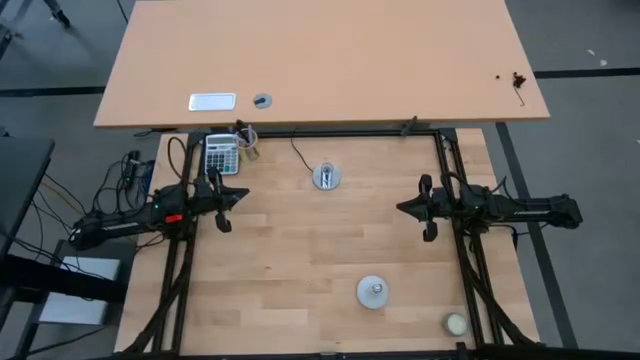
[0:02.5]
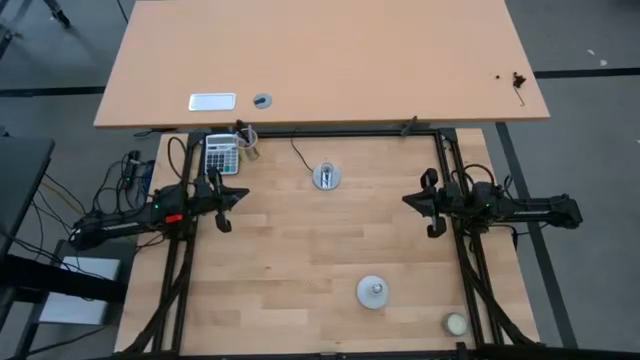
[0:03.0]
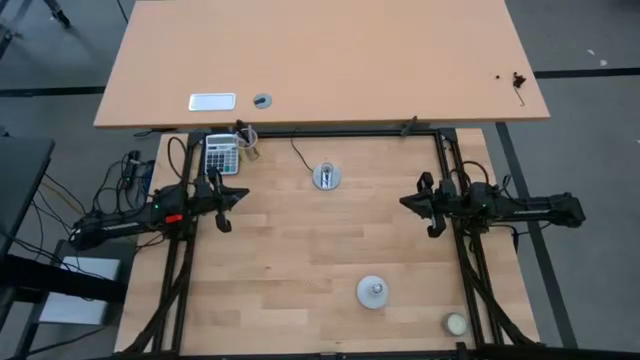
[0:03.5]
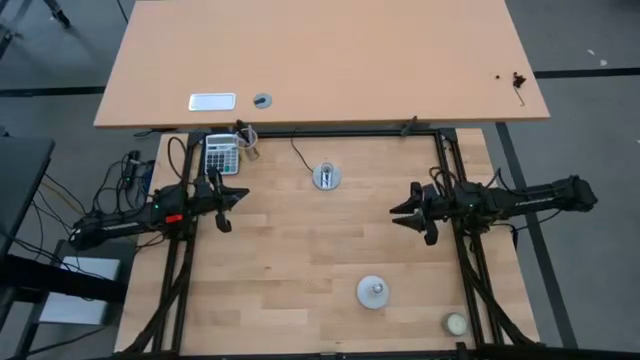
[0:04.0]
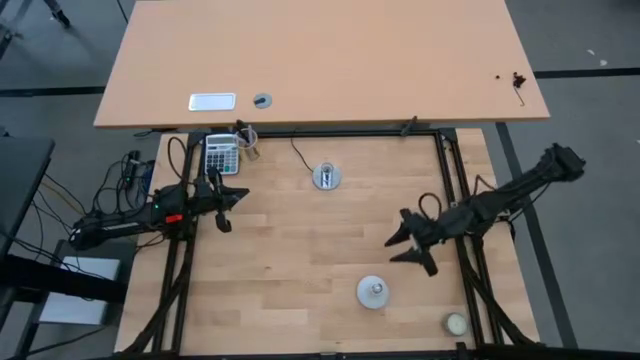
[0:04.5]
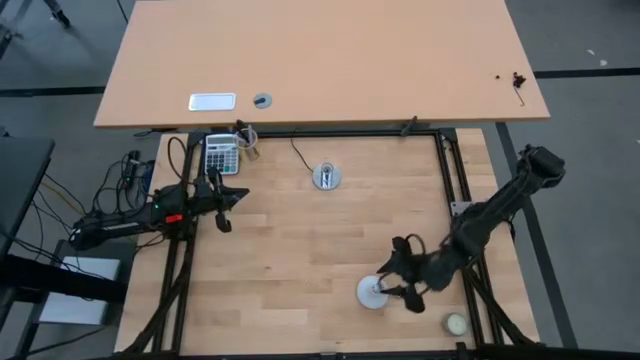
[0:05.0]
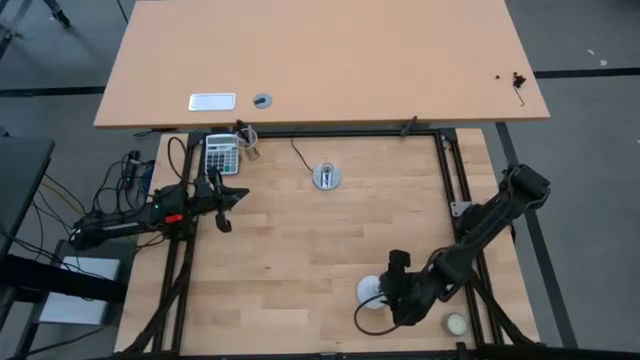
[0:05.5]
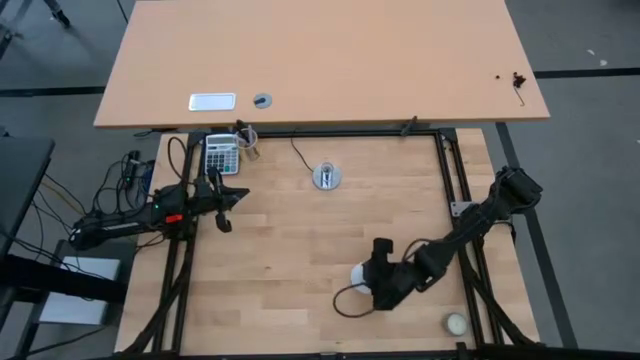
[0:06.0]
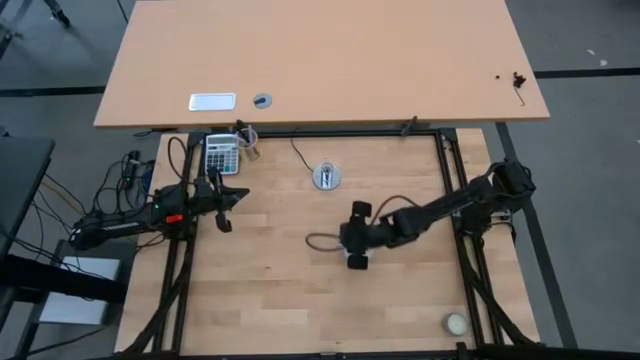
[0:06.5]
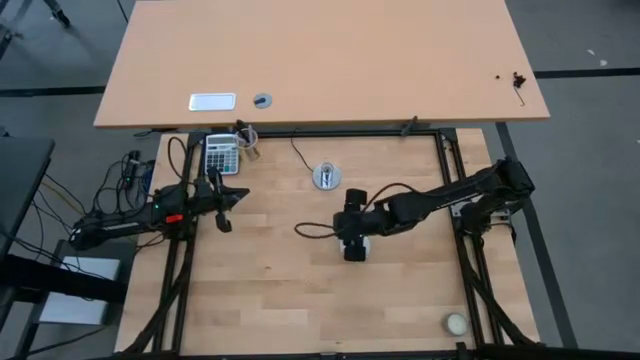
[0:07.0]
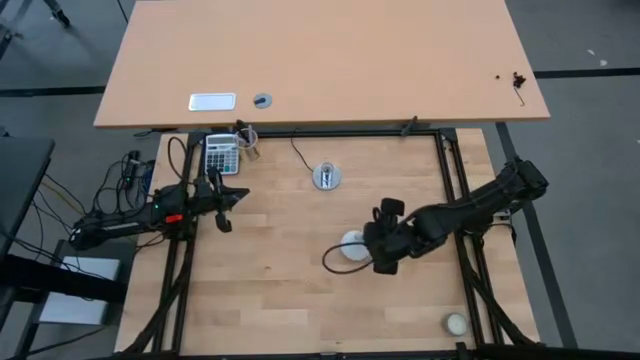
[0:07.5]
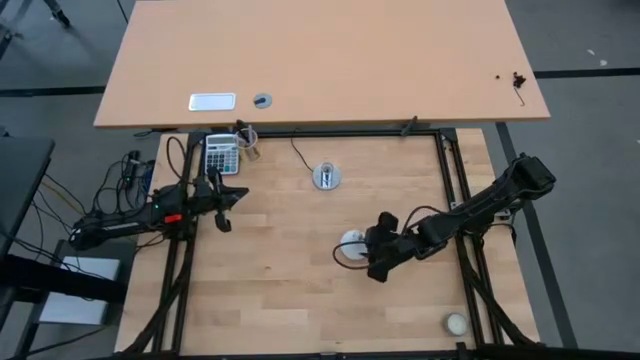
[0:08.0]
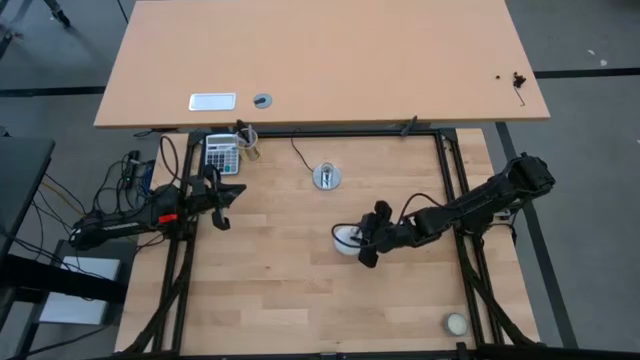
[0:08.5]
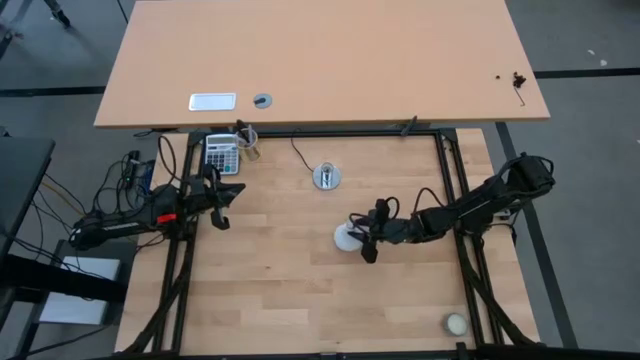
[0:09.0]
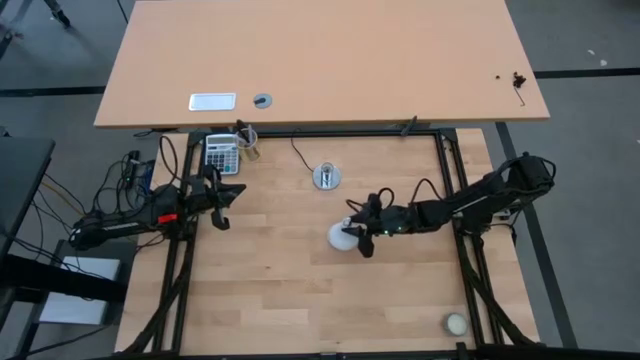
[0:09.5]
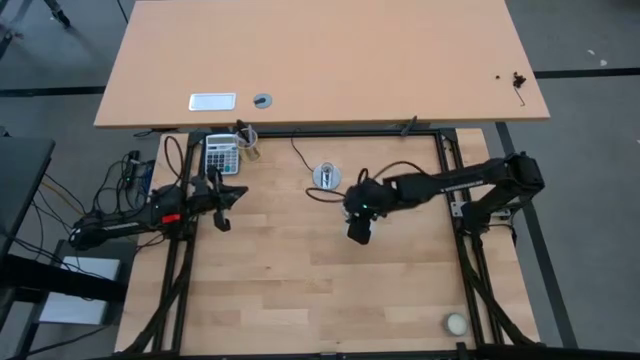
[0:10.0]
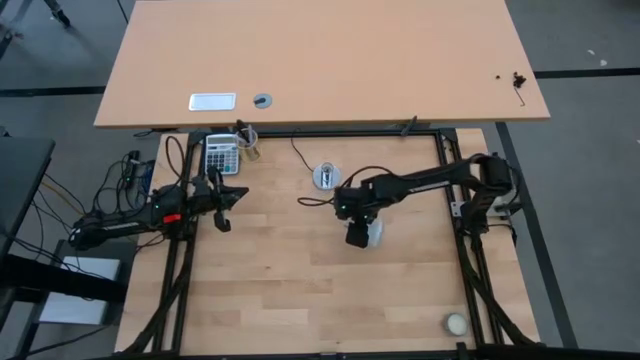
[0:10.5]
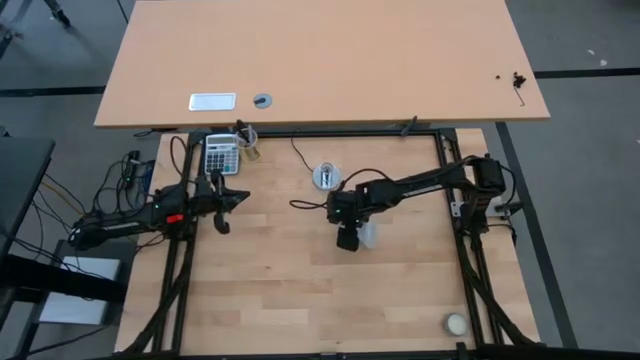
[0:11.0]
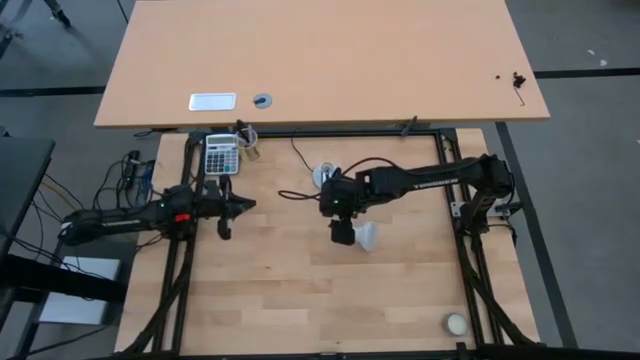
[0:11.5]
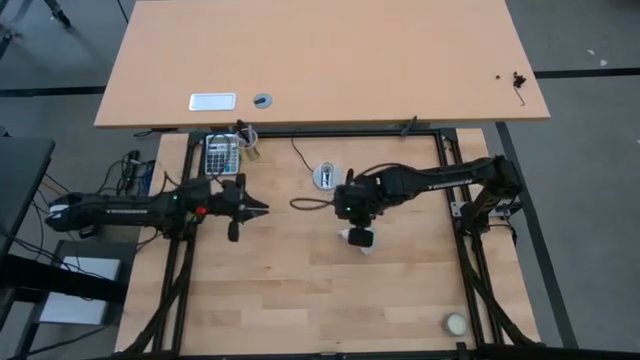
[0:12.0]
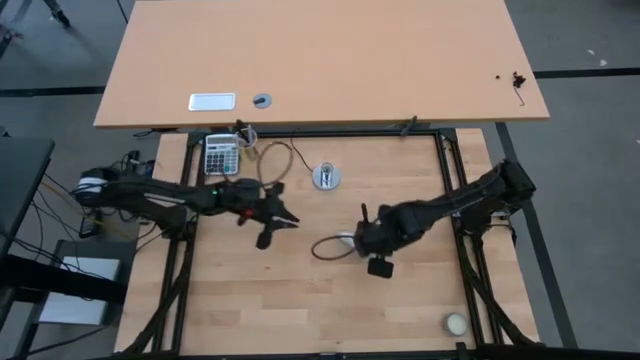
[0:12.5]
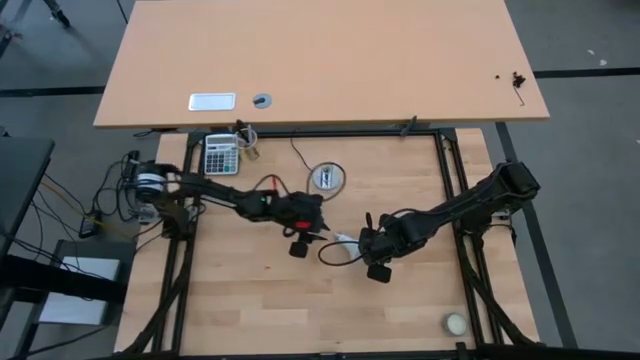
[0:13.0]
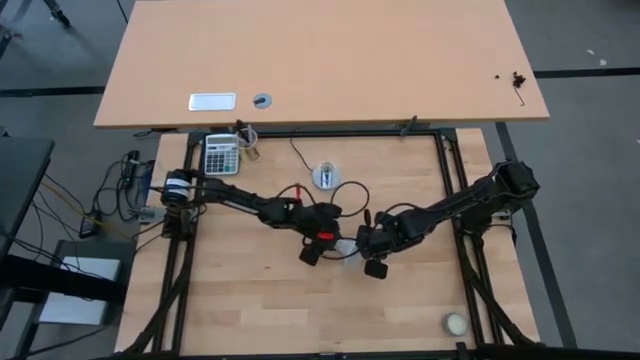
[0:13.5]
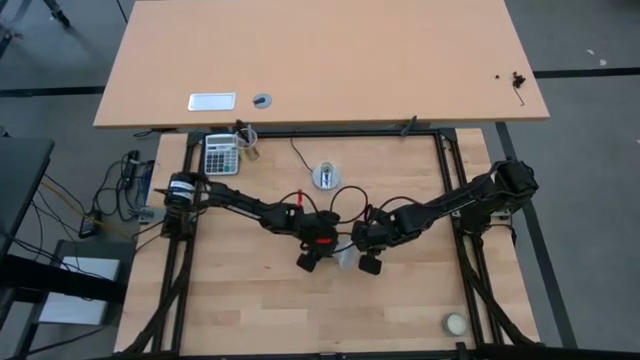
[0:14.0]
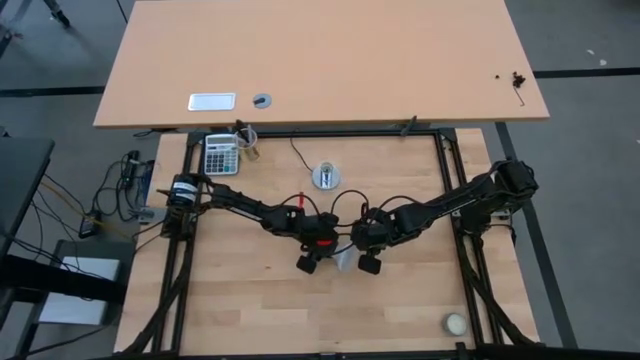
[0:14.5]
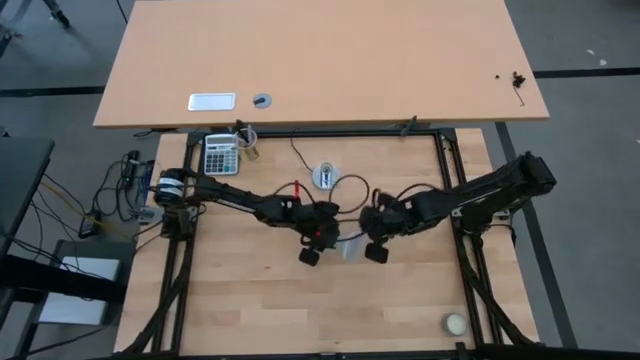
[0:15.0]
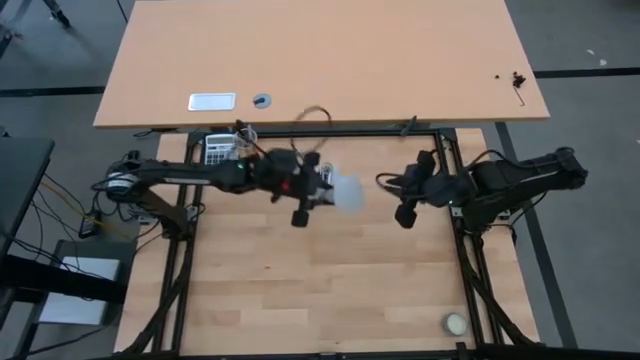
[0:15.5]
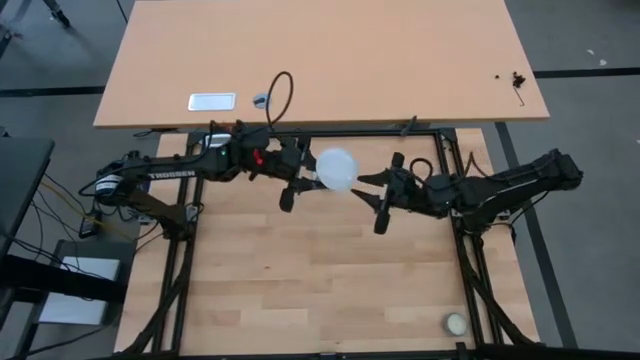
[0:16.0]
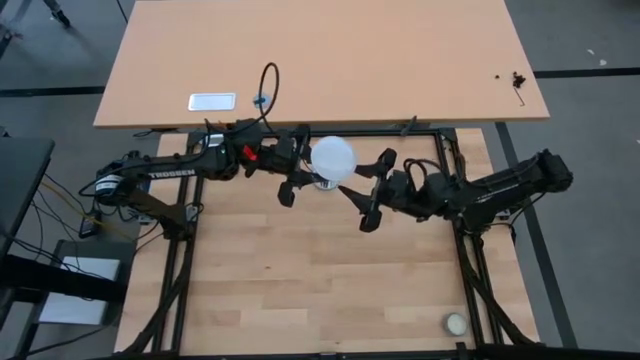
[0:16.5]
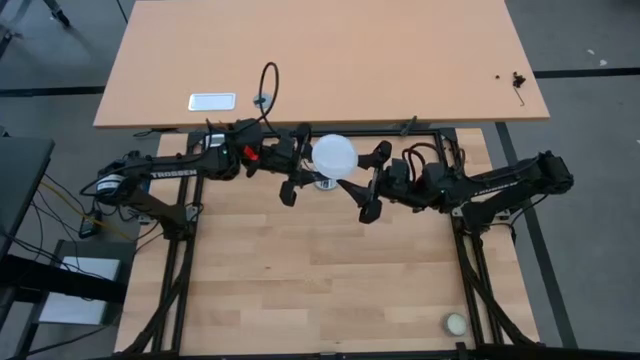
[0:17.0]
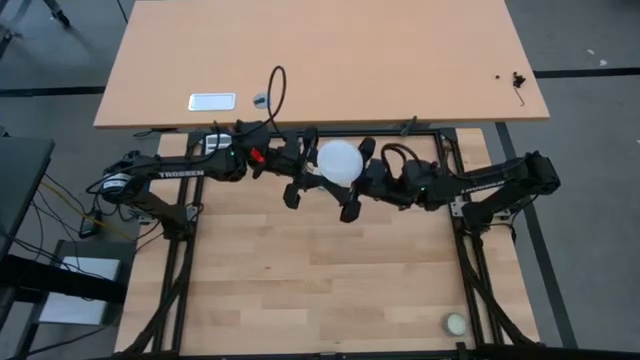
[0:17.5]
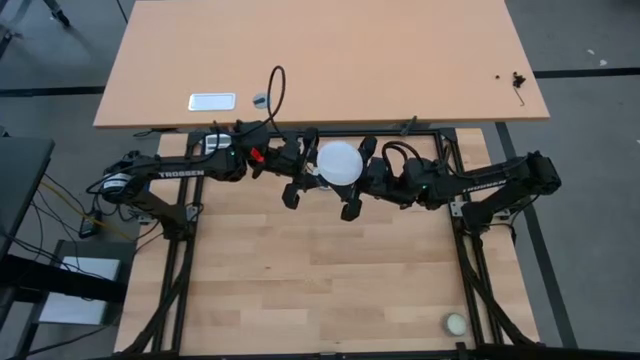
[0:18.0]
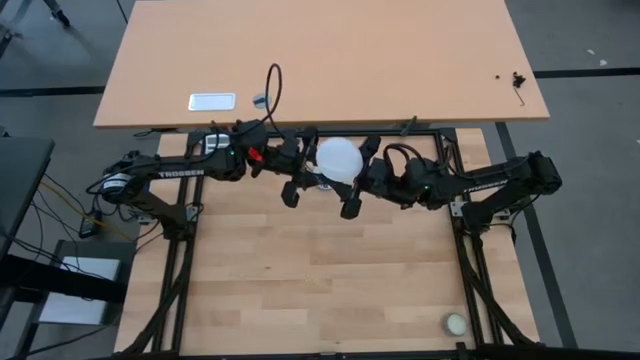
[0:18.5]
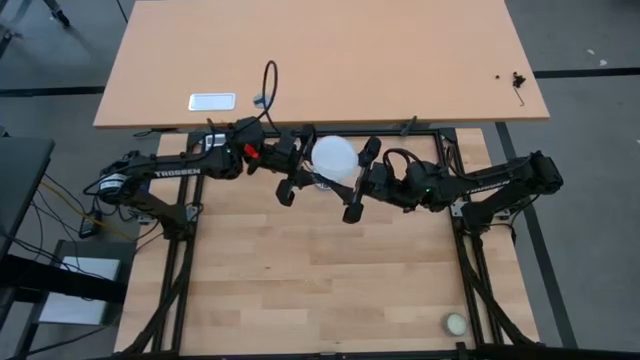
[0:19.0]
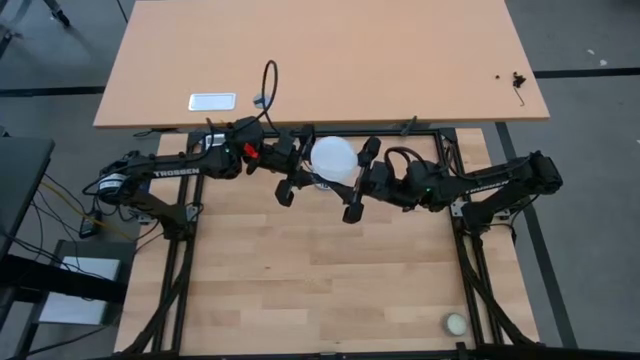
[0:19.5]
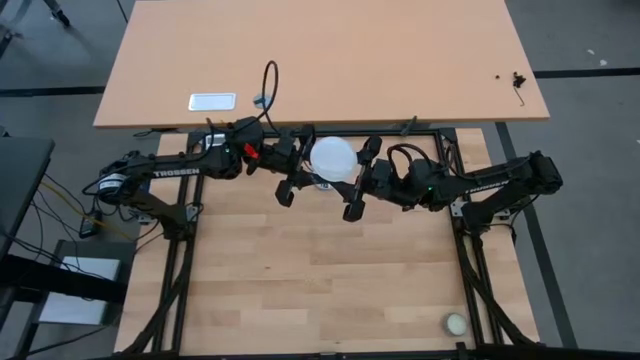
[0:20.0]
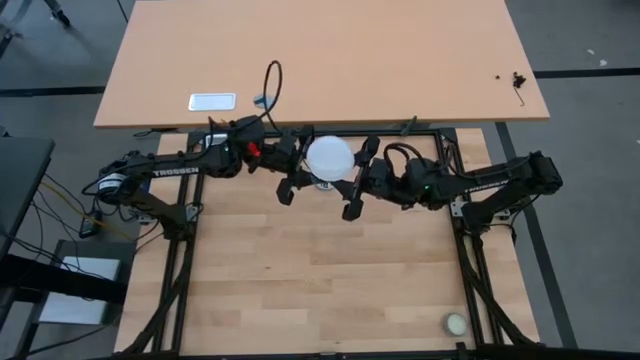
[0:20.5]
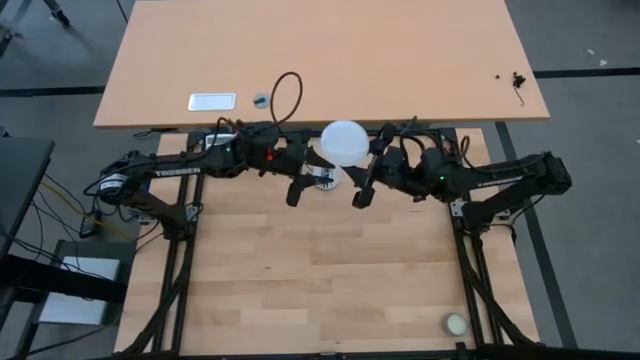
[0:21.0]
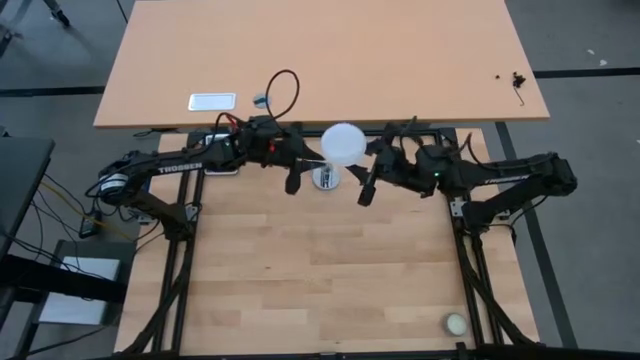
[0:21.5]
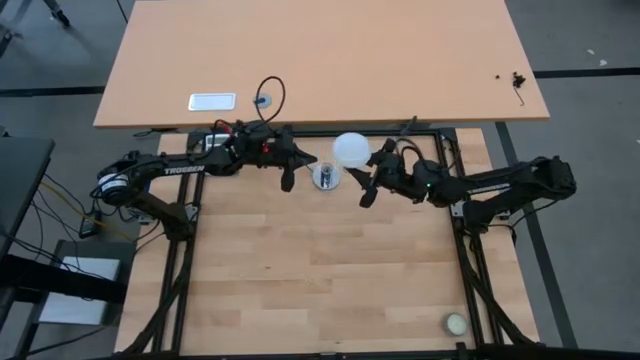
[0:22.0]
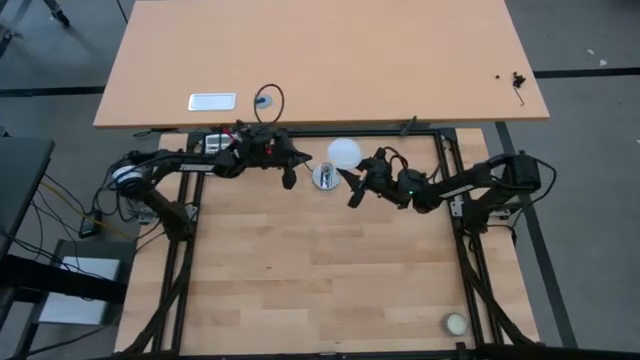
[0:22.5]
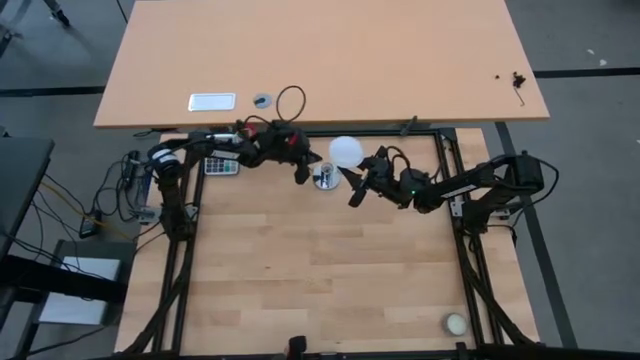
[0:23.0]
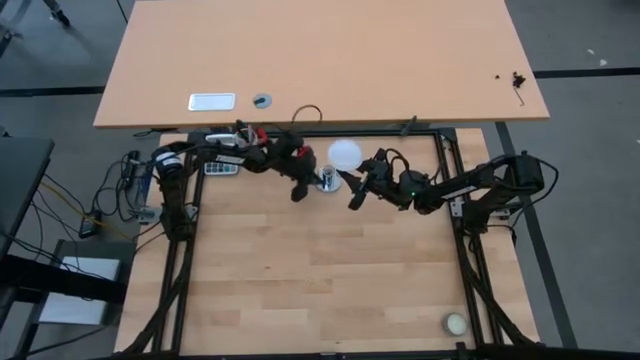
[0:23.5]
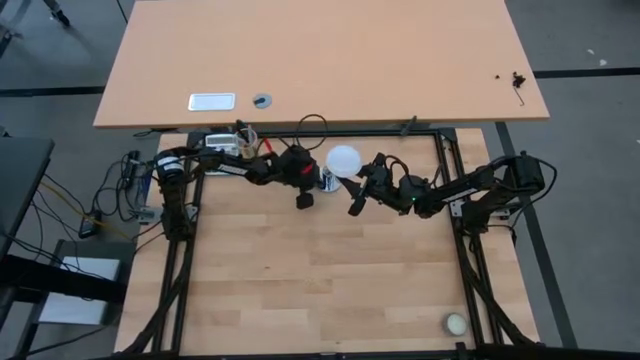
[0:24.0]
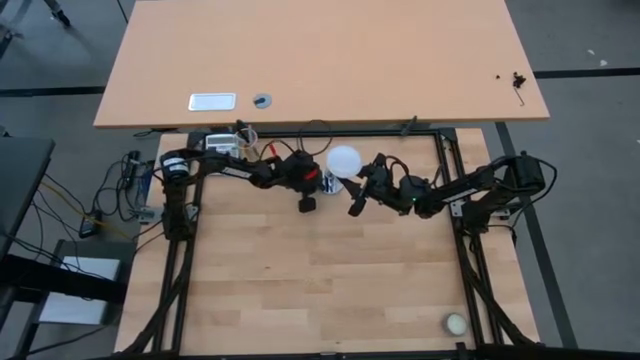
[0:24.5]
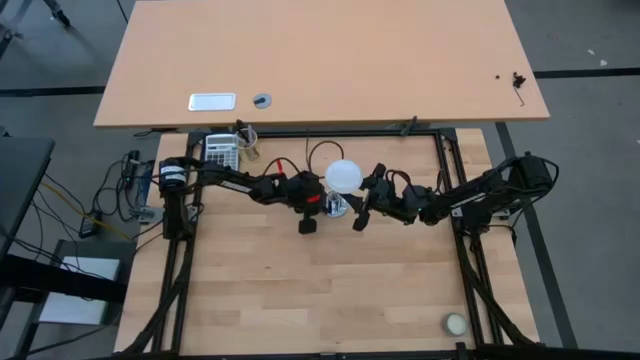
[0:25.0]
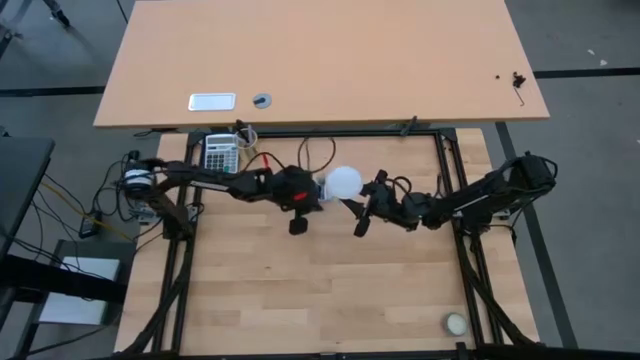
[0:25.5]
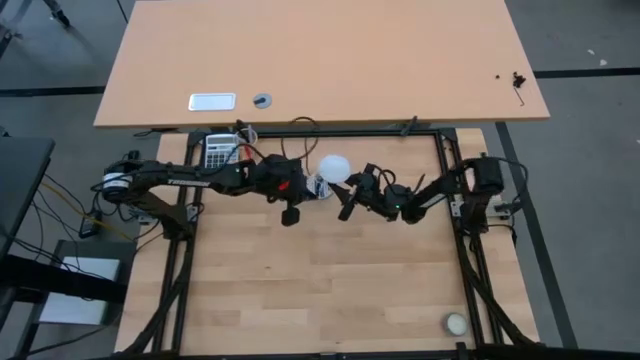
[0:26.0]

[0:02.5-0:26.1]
Task: Screw lightbulb
Insert the white lightbulb on the silver lamp
